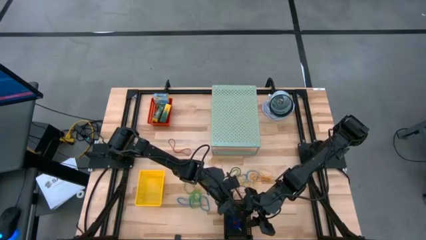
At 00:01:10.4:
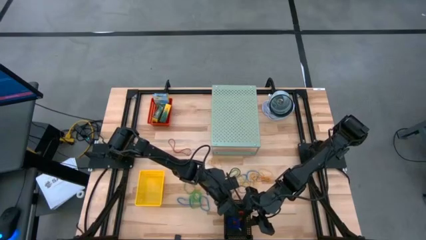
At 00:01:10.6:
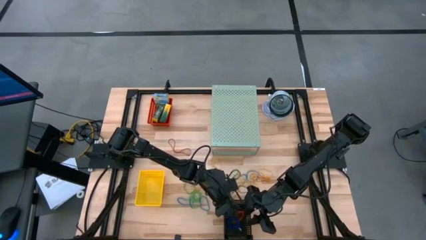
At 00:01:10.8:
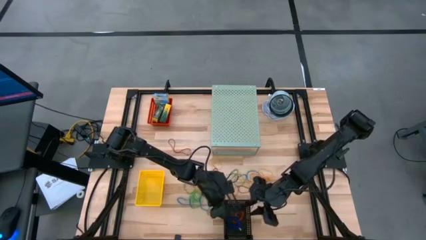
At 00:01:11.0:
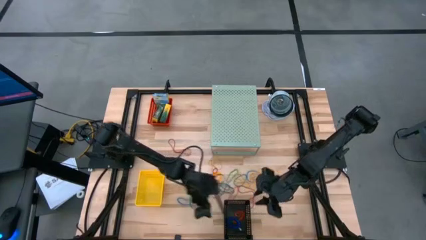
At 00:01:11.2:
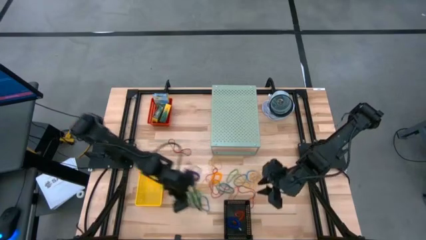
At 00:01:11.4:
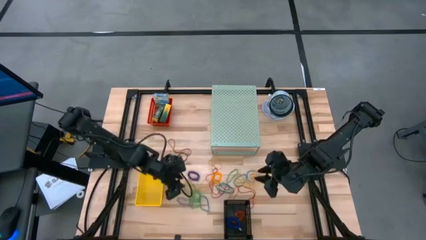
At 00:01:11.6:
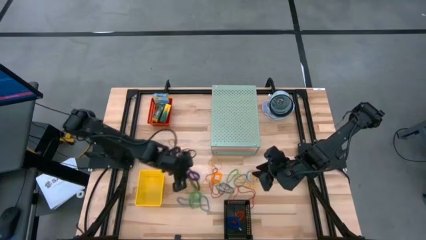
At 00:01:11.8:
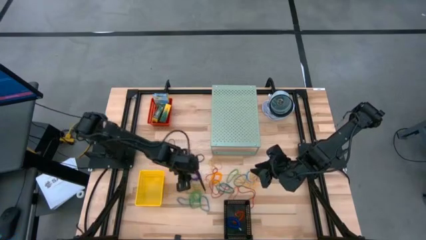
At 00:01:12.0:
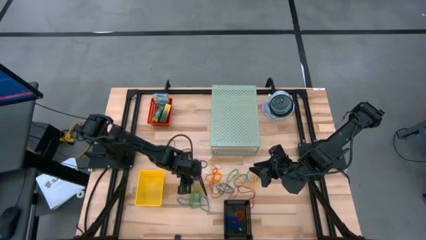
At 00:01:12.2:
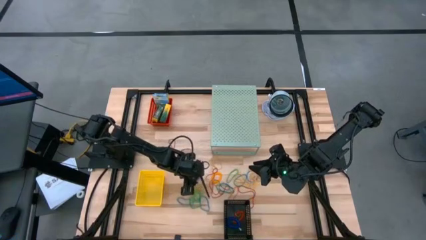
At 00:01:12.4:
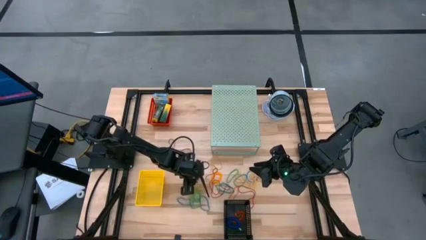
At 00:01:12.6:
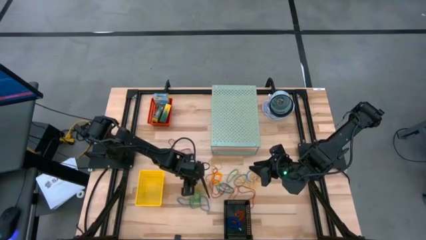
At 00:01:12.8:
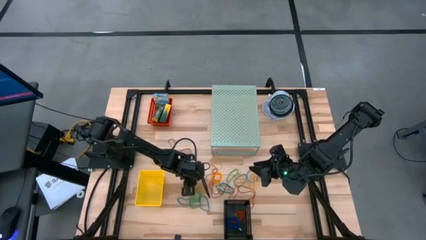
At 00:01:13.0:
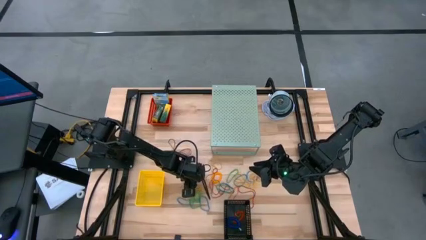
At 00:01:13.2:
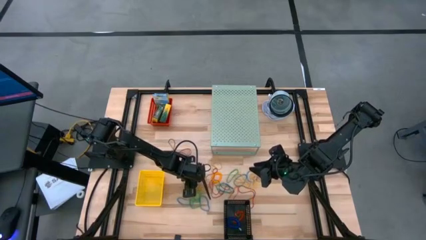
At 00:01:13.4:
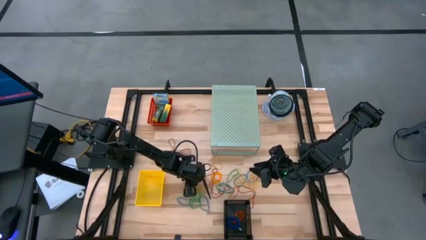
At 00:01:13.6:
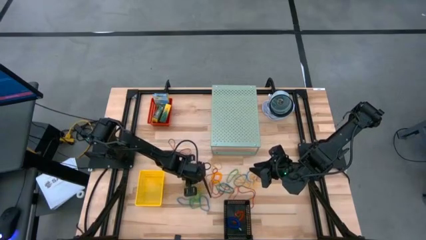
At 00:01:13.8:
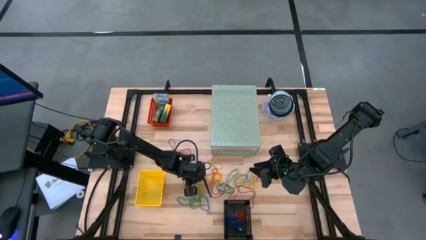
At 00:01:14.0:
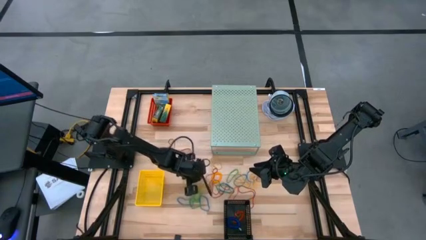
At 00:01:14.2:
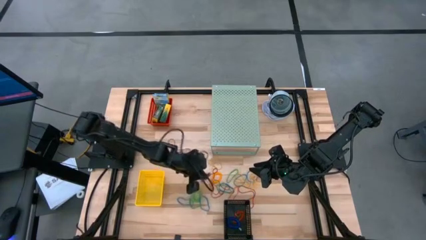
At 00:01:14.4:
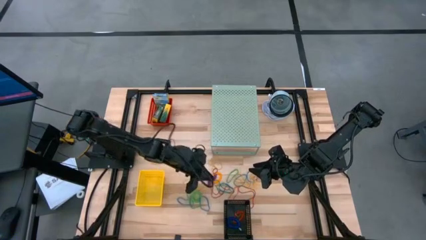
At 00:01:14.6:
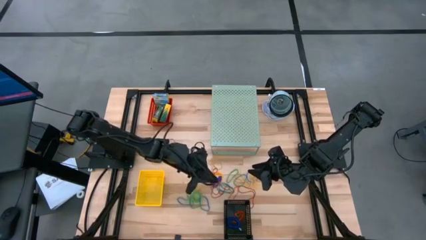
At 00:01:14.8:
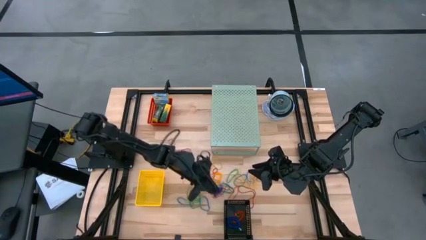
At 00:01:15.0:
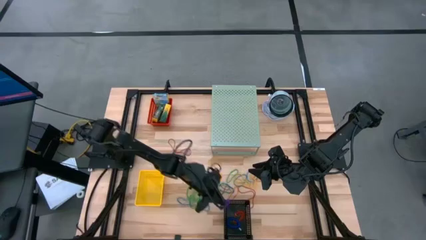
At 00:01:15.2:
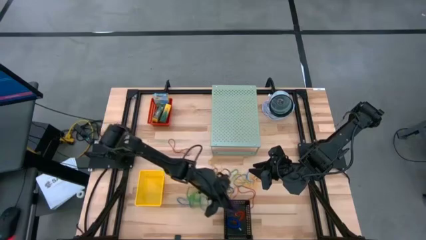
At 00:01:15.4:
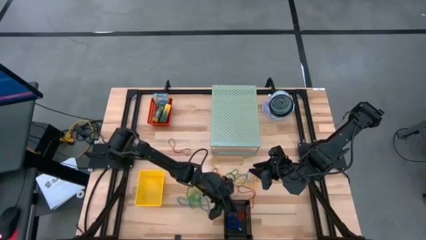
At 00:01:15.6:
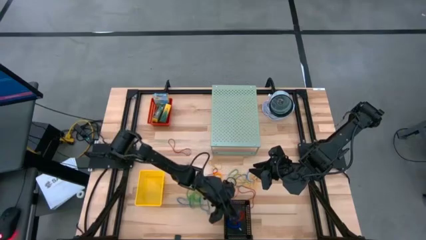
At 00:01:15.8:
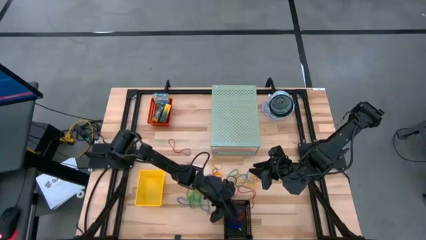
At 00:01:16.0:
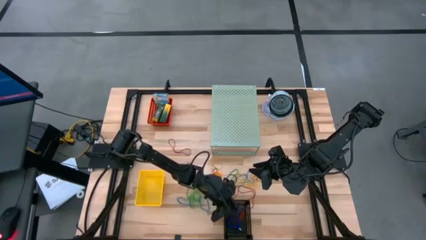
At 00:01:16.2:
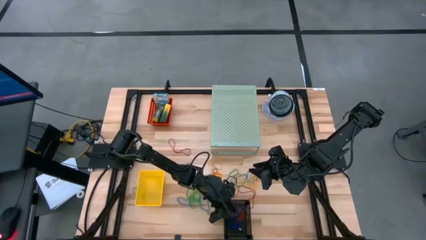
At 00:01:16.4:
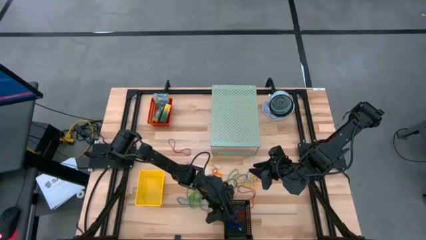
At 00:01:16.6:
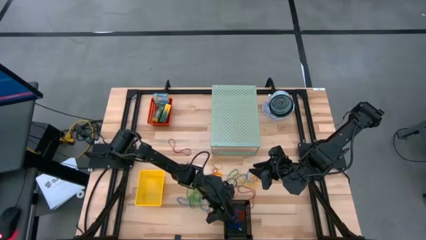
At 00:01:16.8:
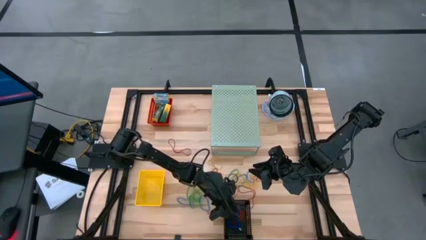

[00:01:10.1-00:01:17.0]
Task: Pick & Place Office Desk Supplies
Put the violet spring keychain into the black bin

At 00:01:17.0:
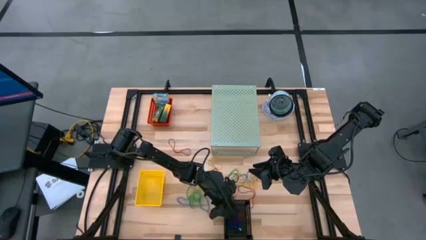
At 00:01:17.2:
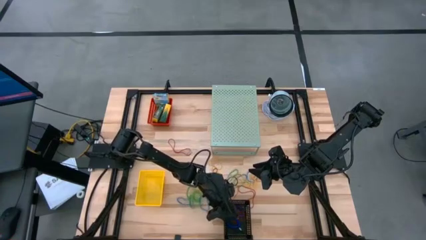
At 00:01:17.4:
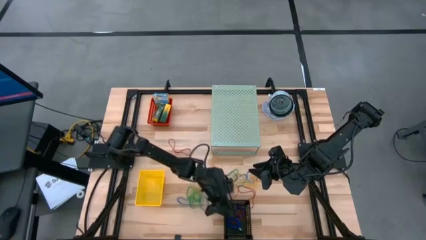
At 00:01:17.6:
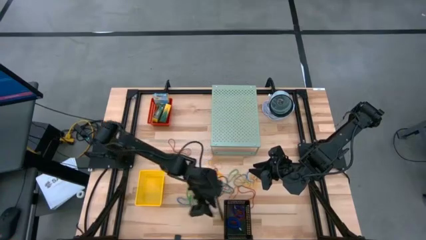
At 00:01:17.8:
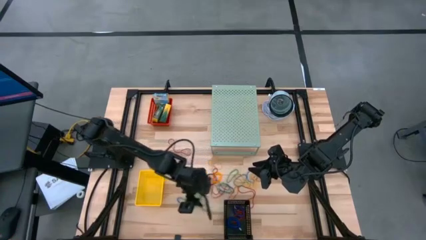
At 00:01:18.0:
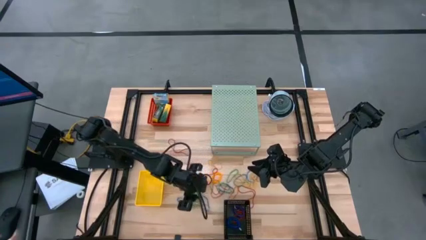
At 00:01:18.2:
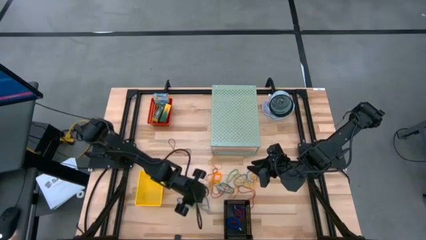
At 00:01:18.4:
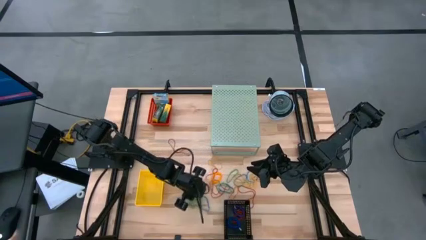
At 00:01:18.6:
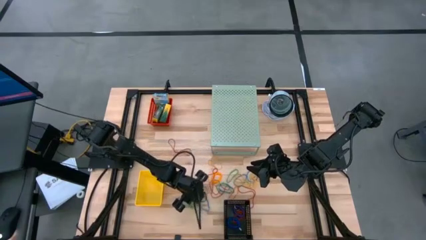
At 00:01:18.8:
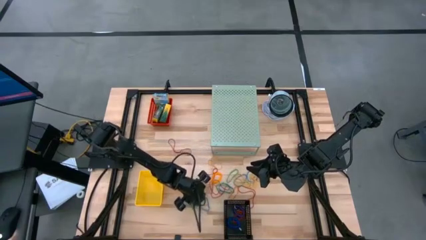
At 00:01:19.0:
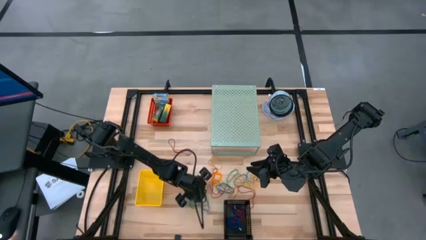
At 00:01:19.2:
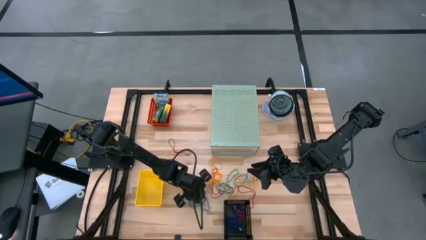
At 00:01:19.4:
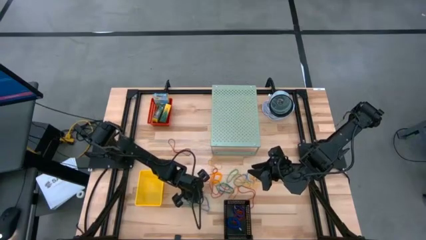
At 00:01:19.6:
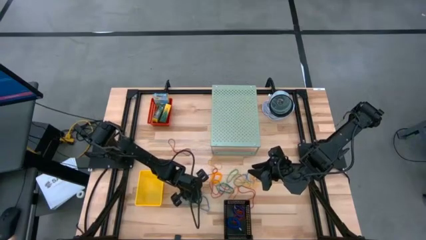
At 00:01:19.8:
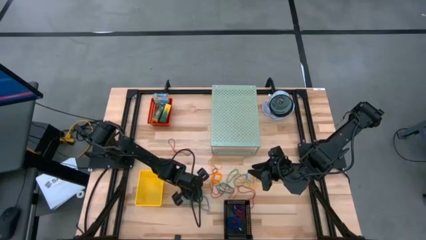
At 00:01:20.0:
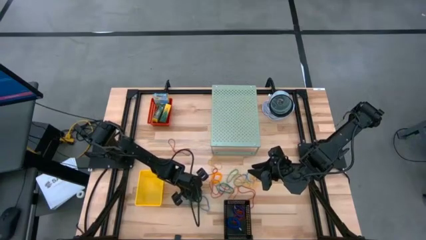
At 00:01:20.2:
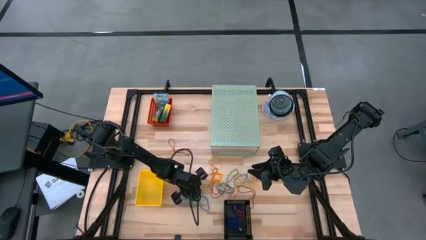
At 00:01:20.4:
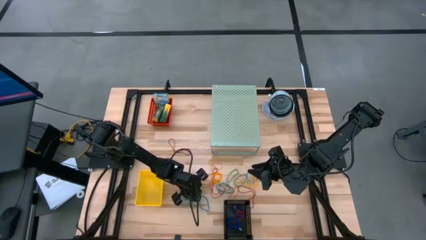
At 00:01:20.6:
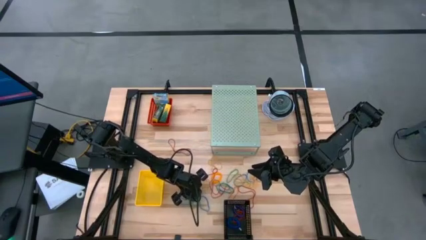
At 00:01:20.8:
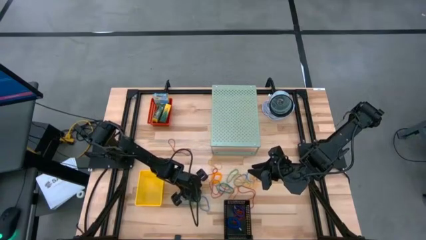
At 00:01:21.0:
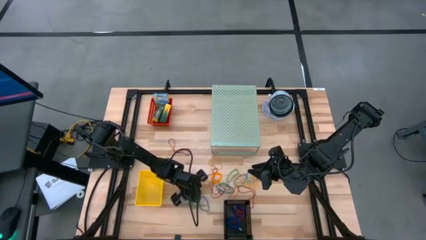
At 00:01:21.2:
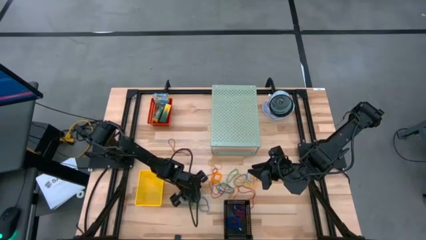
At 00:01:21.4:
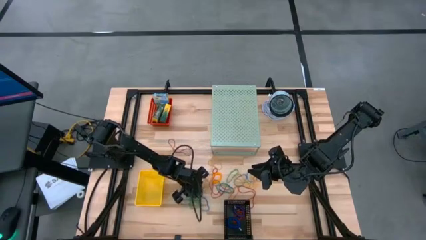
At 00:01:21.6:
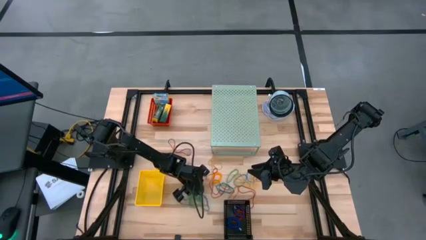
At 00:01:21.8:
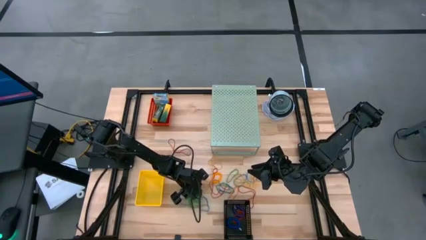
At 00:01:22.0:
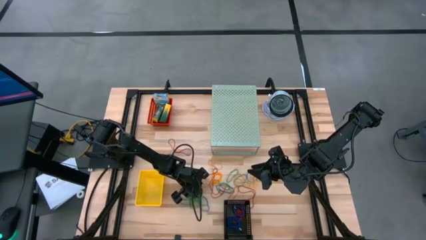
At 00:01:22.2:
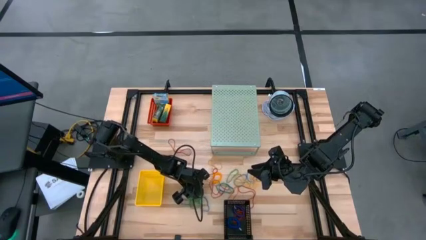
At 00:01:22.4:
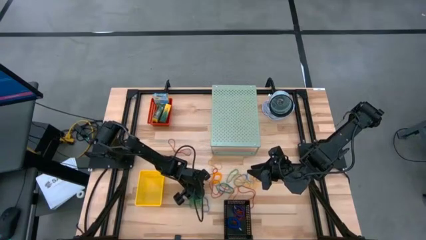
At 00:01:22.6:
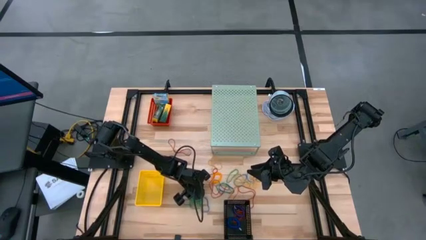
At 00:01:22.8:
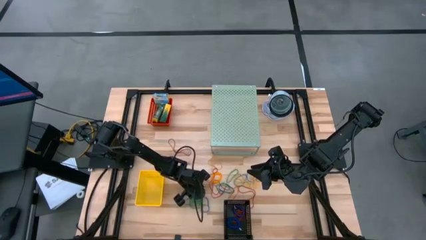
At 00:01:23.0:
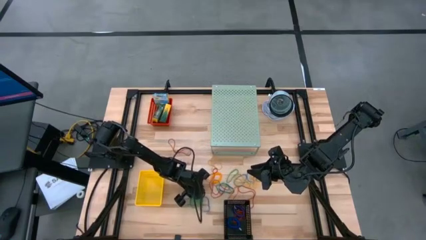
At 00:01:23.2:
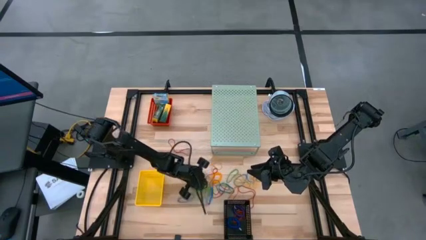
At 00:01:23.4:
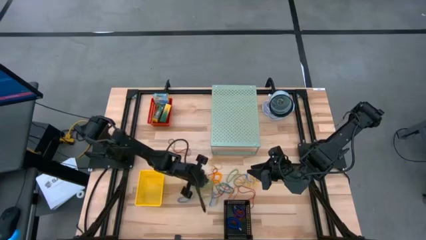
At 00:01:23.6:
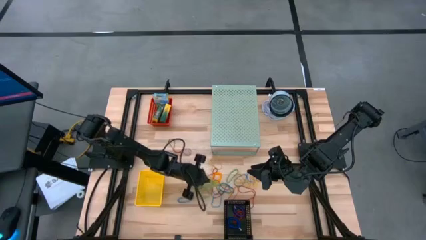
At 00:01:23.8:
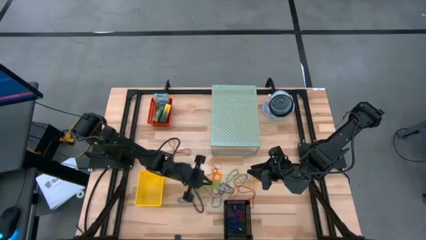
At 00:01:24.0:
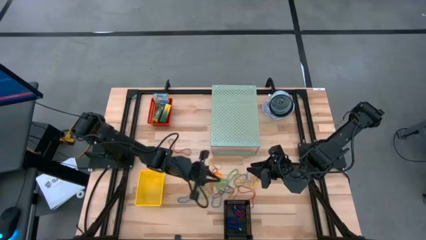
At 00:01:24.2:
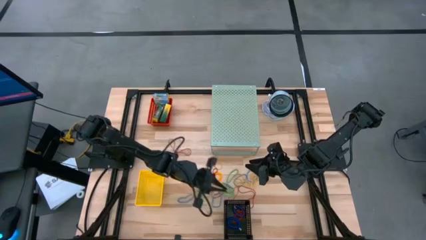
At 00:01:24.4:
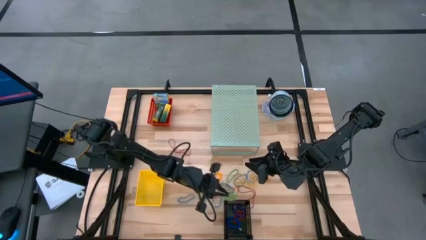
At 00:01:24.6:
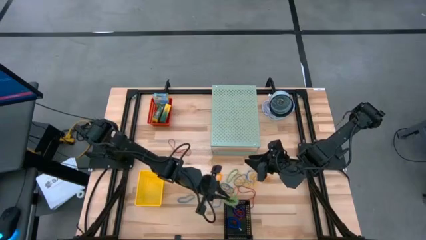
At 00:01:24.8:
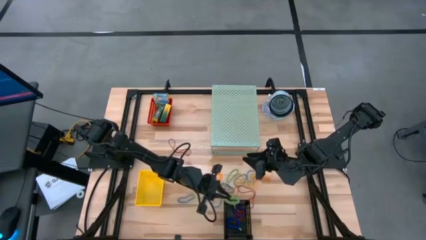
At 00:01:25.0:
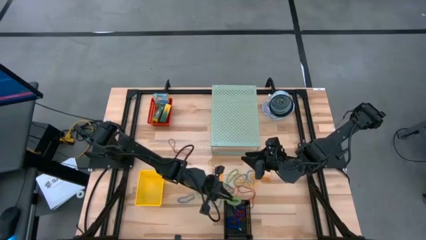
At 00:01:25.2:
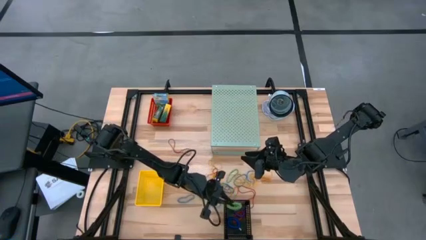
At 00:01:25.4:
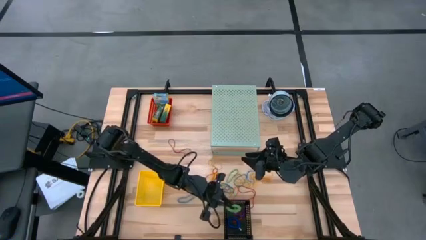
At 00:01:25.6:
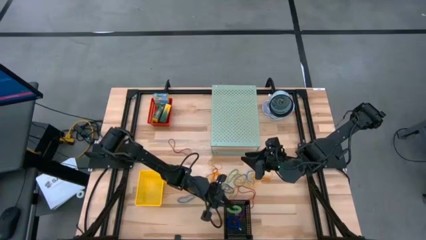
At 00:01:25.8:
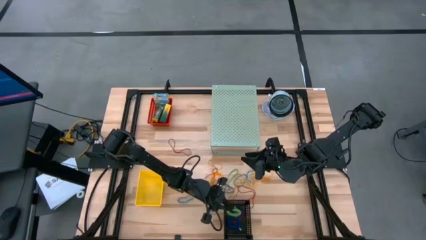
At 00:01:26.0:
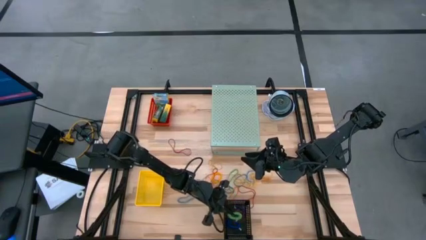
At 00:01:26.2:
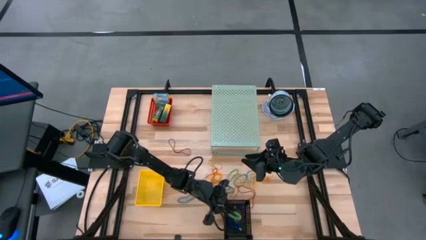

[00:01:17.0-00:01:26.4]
Put the green spring keychain into the black bin
